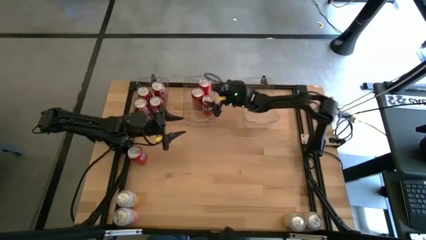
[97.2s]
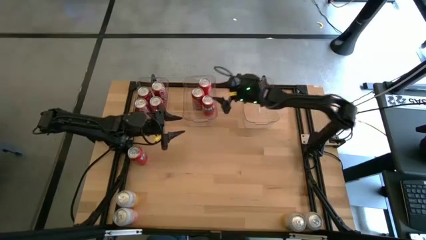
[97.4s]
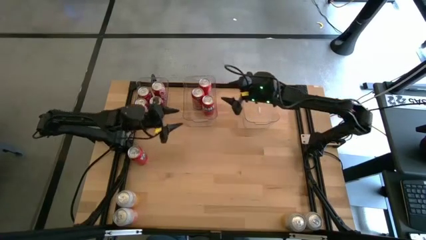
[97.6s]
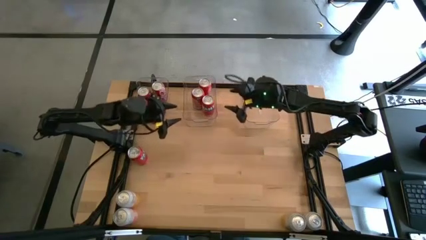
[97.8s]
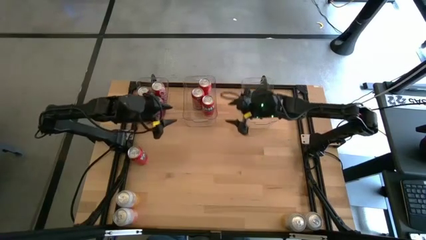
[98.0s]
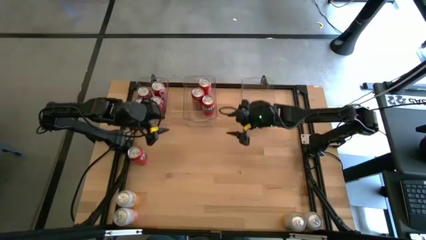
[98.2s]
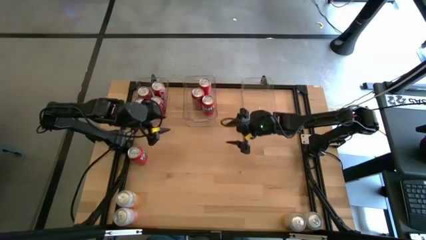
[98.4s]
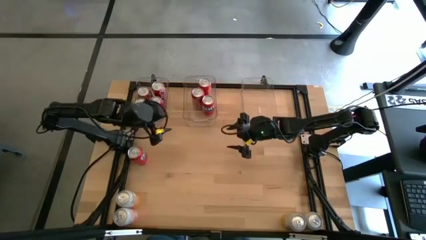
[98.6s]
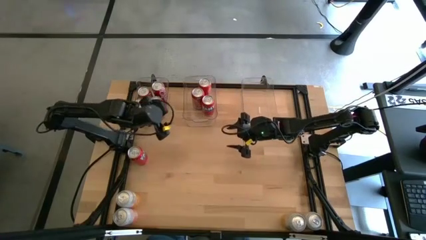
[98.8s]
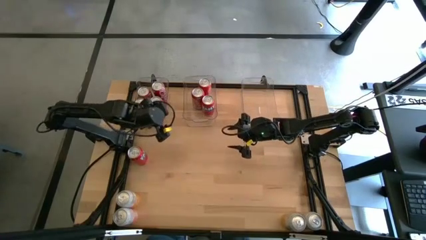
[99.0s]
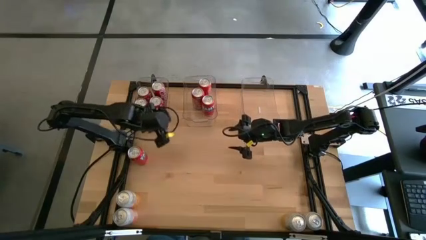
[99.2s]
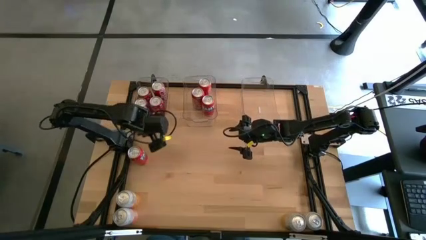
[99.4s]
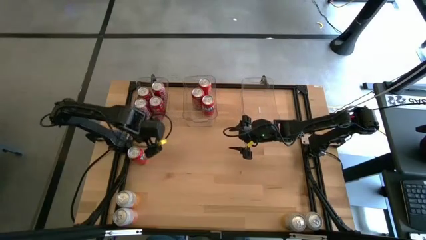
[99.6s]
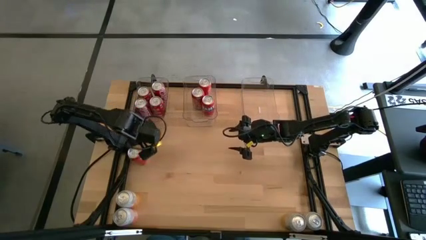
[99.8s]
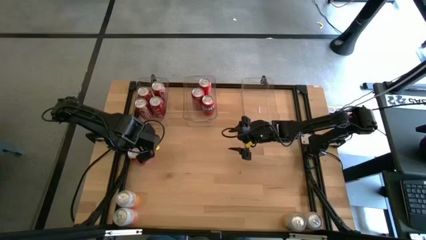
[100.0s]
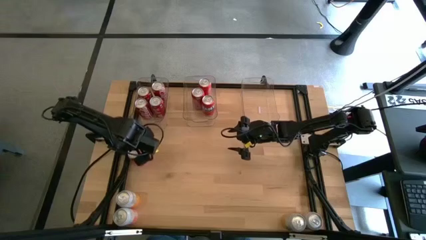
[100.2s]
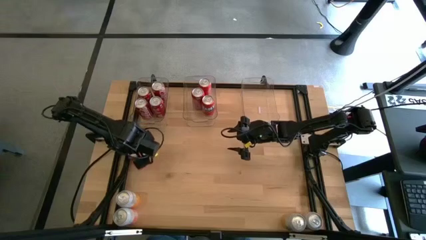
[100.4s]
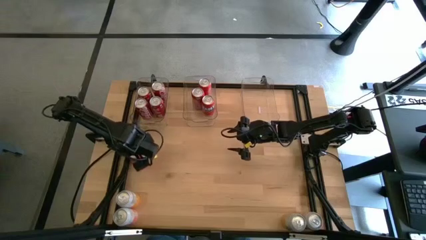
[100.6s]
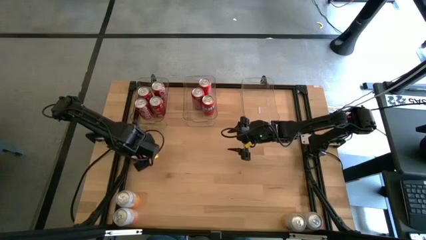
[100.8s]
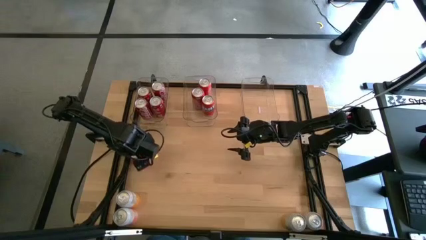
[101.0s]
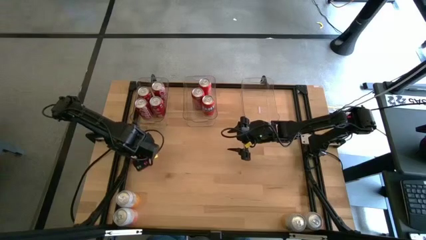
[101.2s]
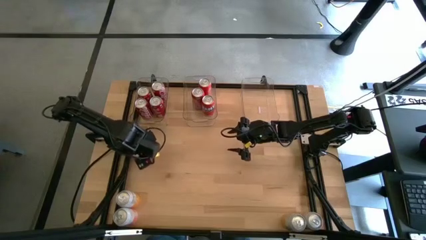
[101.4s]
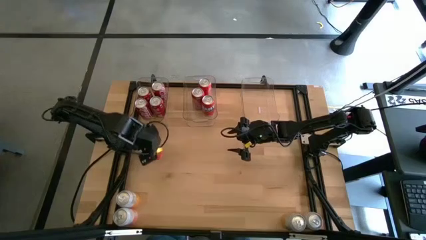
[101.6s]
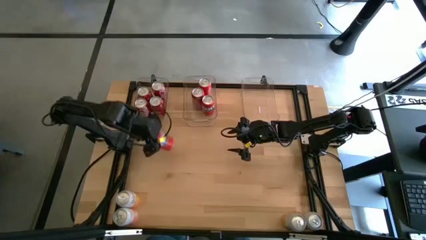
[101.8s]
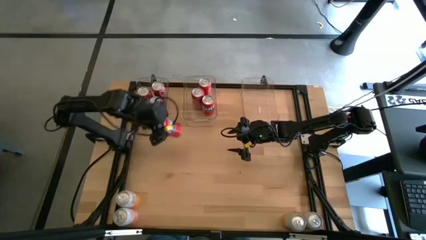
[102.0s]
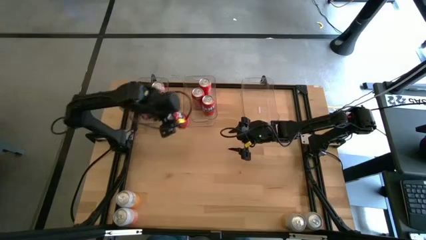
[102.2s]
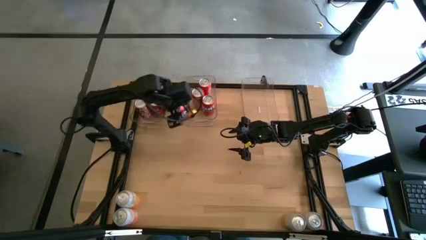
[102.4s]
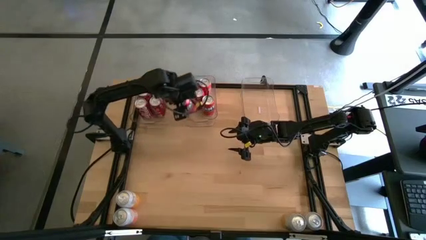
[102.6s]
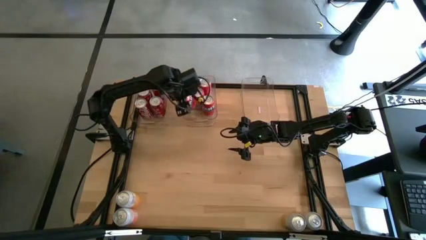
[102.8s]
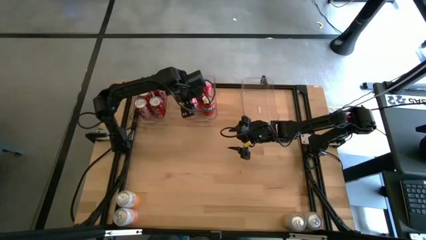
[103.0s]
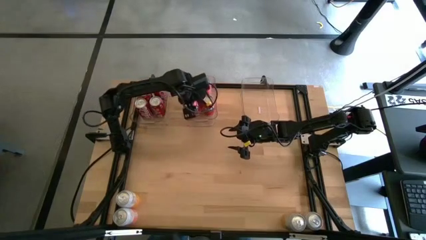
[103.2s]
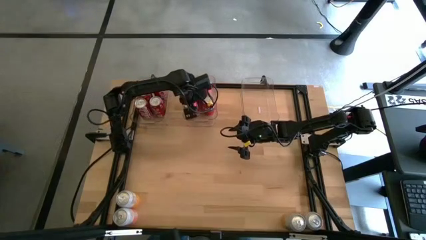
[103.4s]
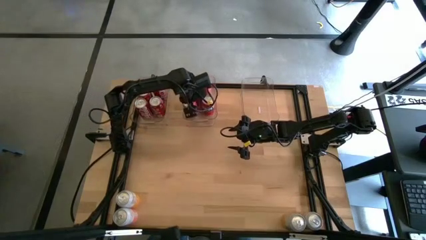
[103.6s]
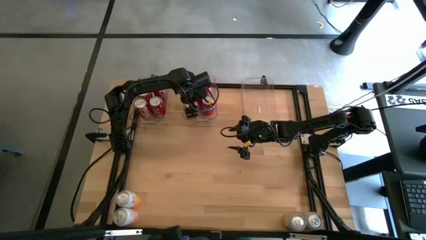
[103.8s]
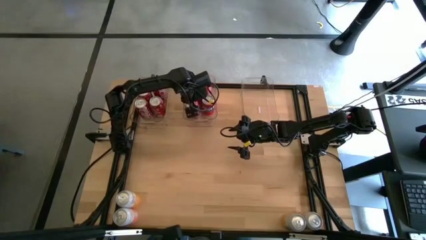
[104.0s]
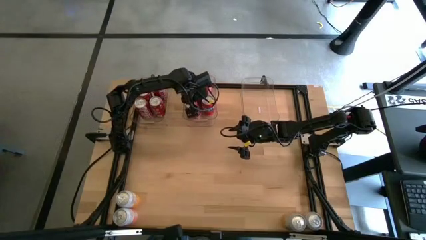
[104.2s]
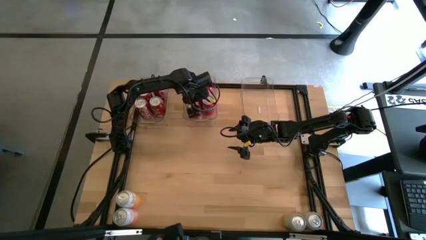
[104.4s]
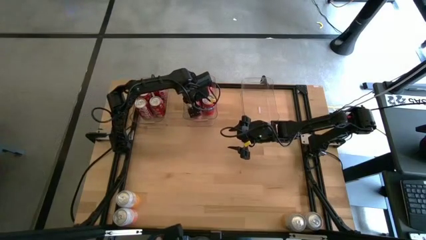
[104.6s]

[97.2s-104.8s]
Task: Sort soda cans
Put the orange soda can into the middle transparent bin

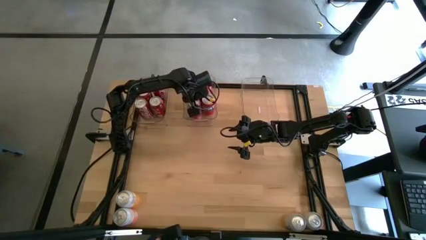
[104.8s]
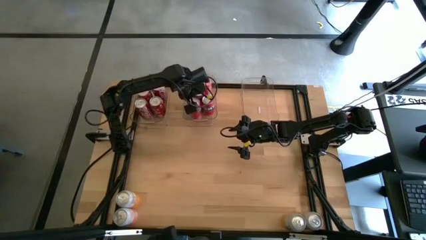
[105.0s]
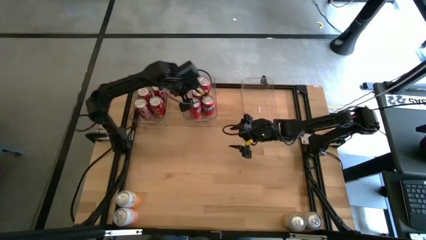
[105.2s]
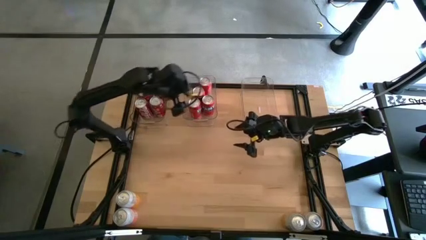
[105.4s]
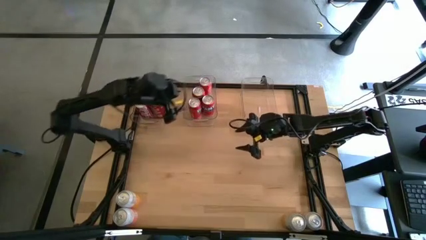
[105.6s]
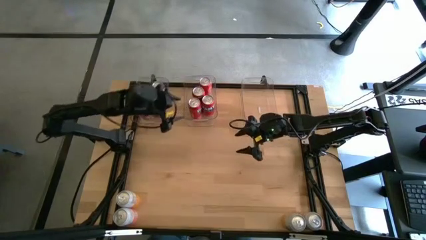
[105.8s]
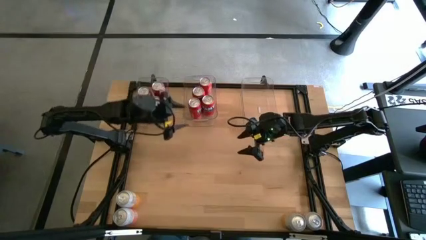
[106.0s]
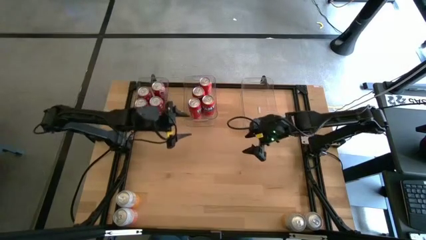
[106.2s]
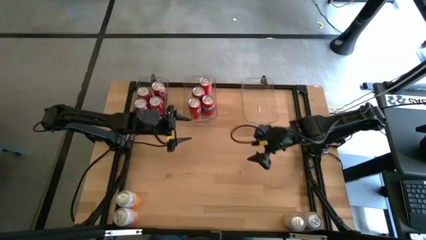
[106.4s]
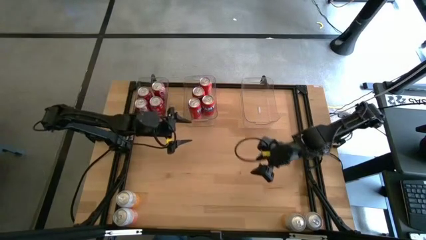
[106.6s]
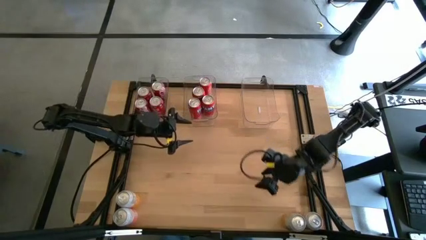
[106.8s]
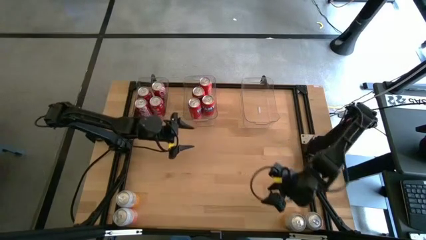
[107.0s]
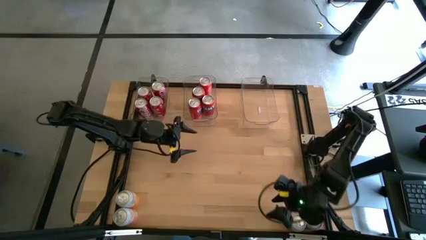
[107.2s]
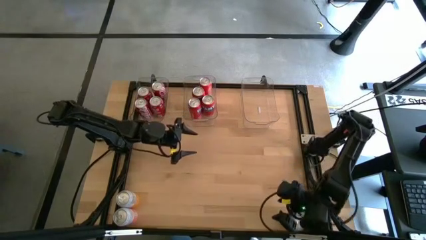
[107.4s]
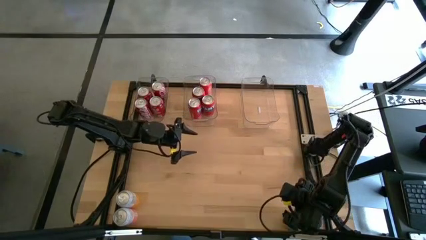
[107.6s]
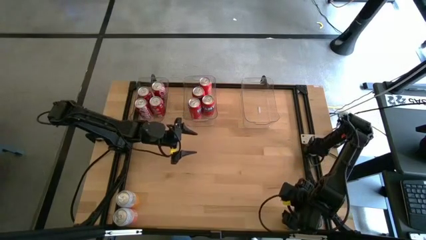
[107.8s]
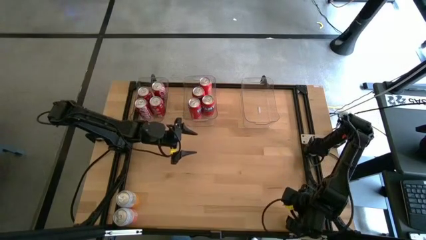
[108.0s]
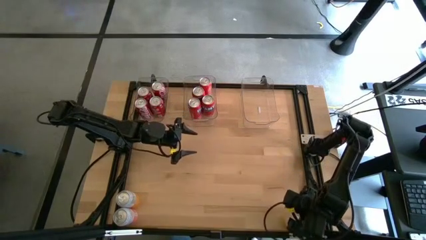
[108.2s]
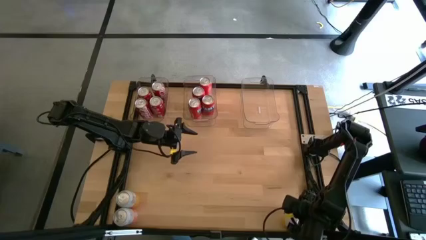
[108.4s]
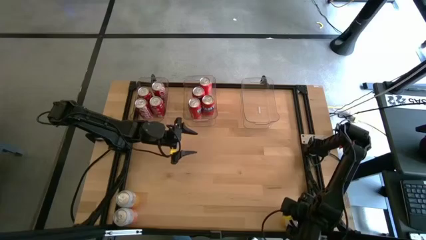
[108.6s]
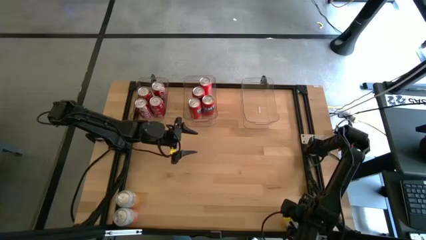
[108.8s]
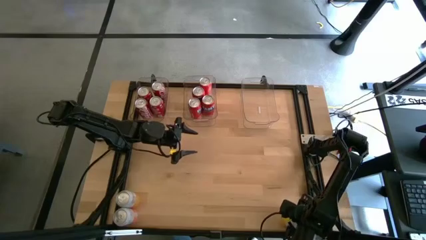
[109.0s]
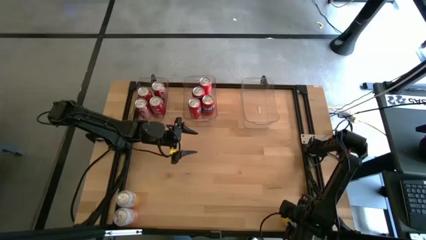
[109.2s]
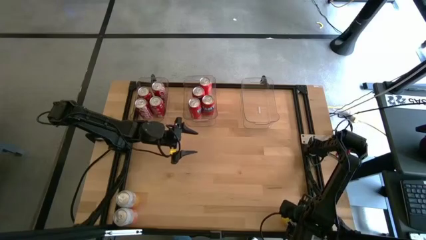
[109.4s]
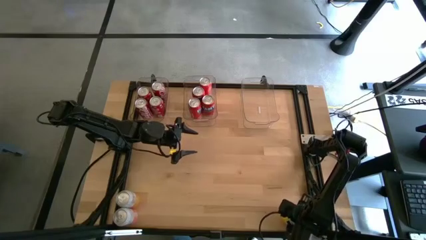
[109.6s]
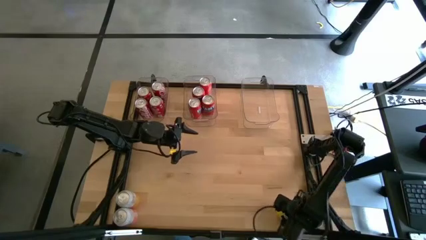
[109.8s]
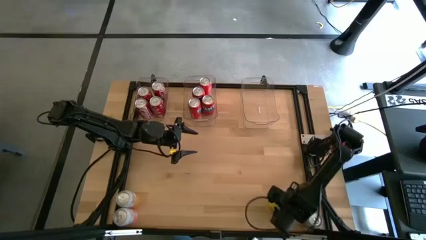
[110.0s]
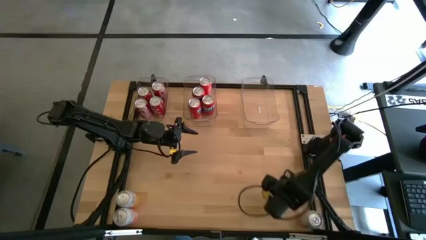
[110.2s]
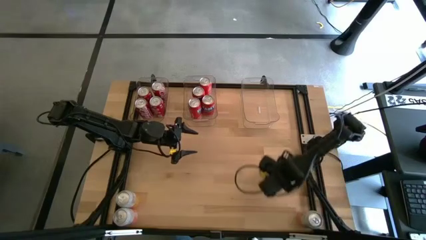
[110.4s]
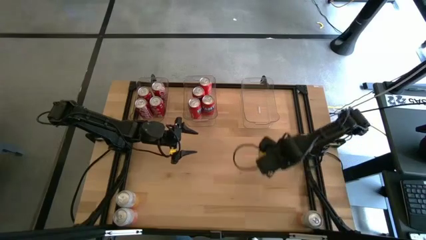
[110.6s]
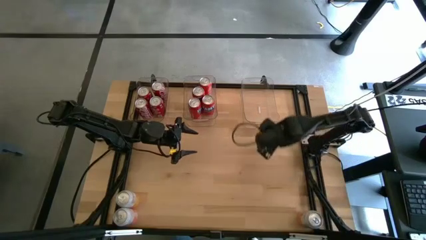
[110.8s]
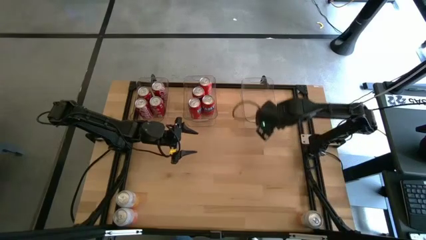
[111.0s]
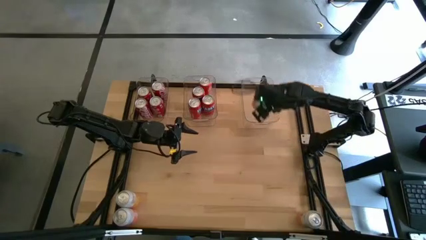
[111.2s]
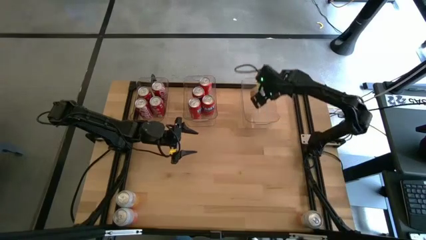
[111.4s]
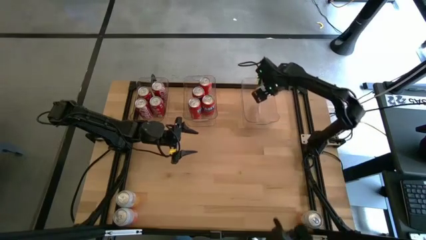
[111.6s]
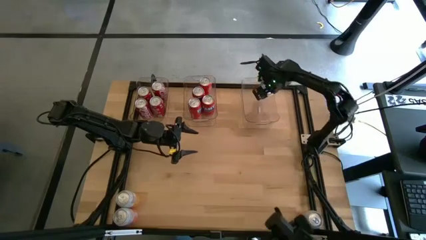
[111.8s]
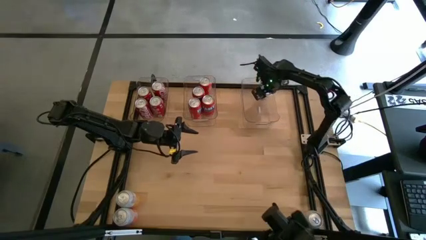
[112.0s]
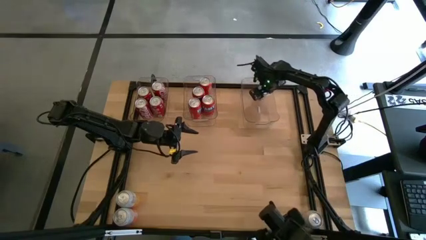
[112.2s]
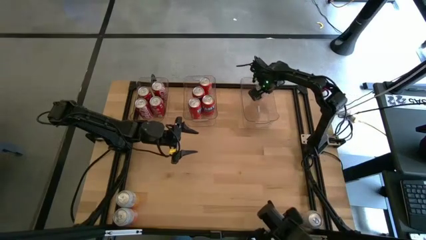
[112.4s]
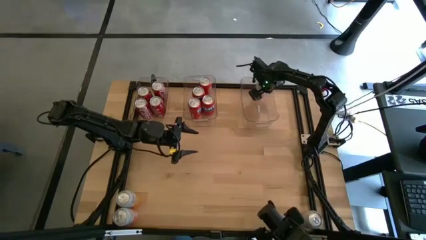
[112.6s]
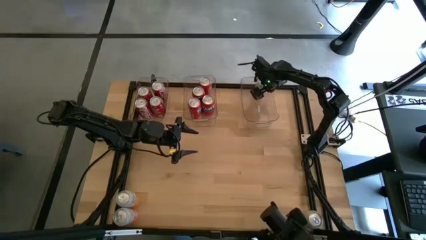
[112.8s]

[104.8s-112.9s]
Put the white soda can into the right transparent bin

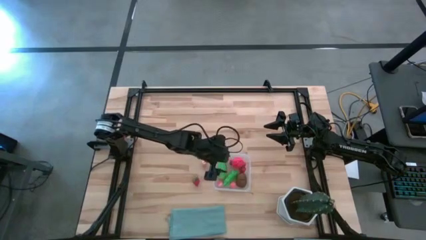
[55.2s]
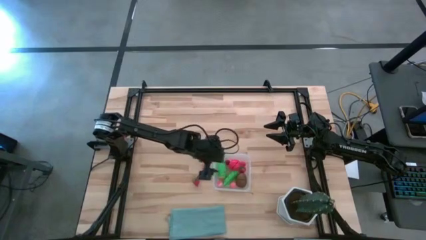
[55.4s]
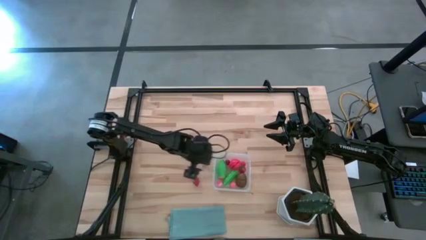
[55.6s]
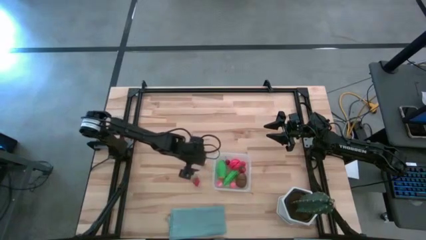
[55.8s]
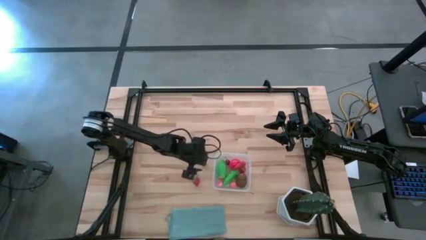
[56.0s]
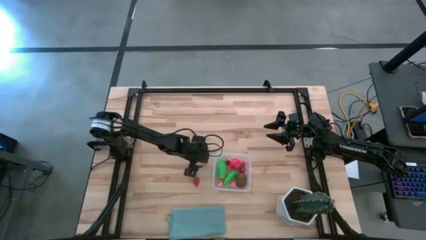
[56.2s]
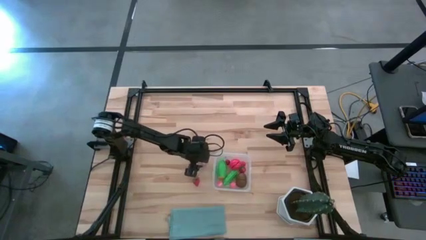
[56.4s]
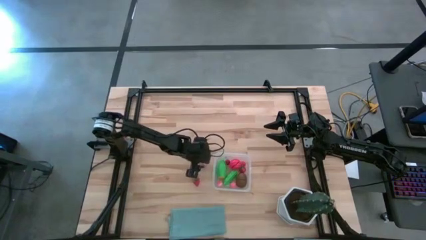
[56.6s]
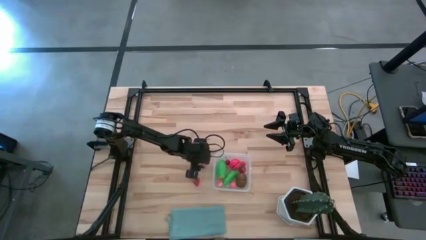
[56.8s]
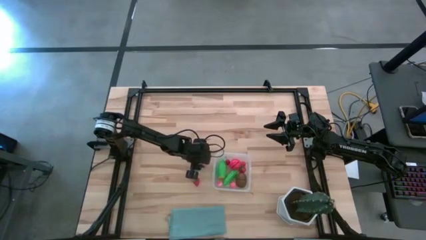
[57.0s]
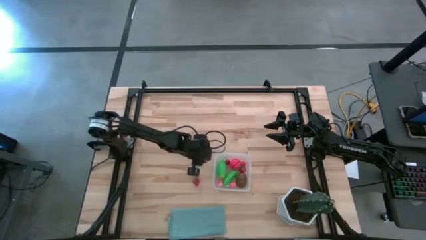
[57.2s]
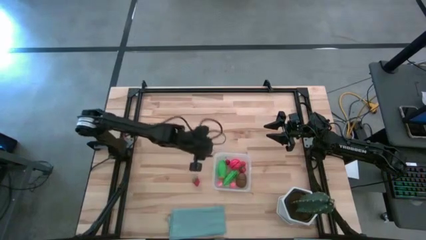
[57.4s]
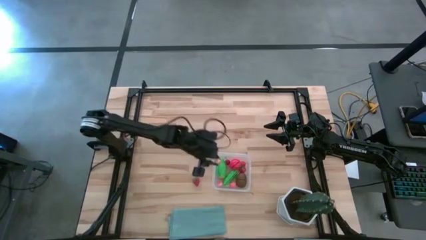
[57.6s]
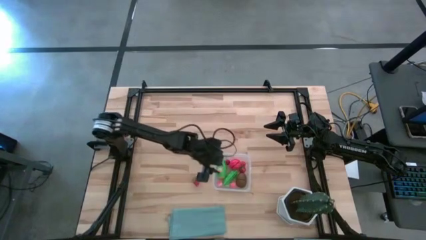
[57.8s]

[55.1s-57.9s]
Task: Pick and placing Produce into tupperware
Put the peach into the transparent container
